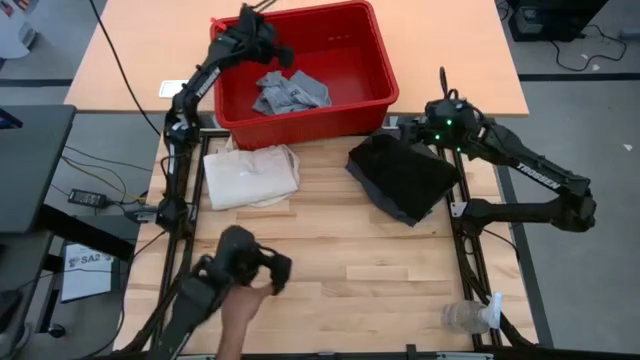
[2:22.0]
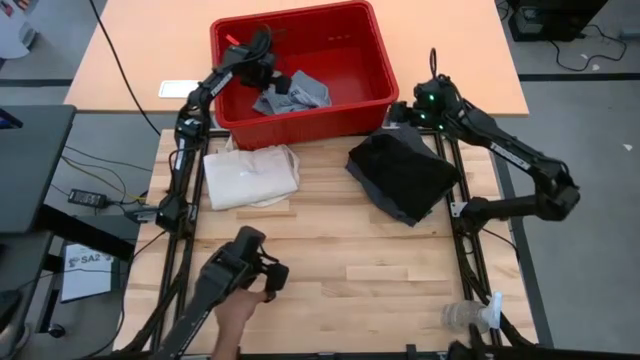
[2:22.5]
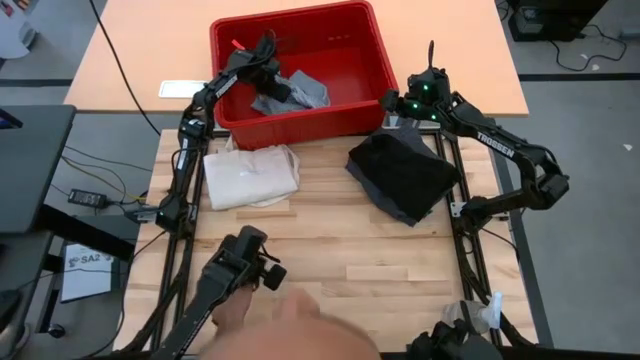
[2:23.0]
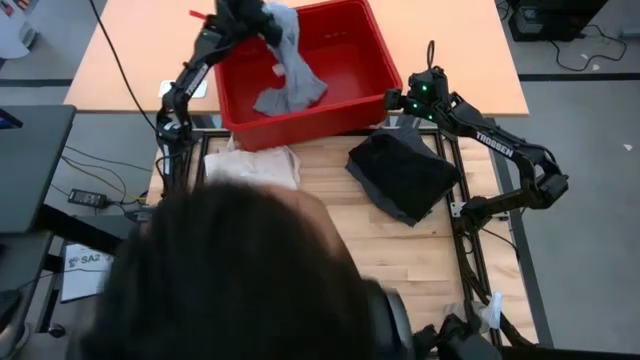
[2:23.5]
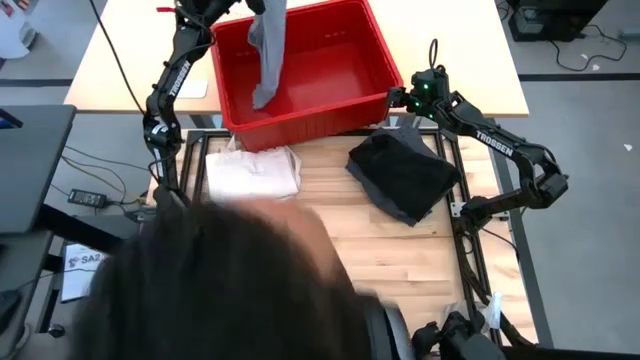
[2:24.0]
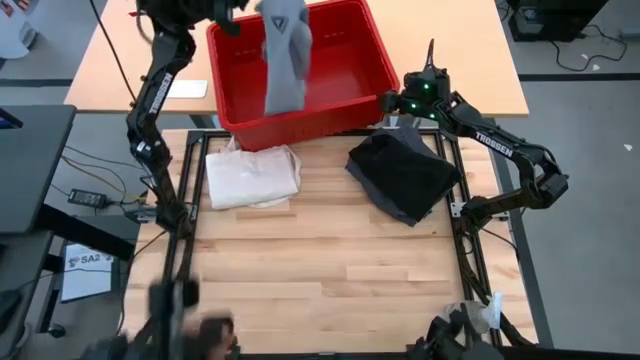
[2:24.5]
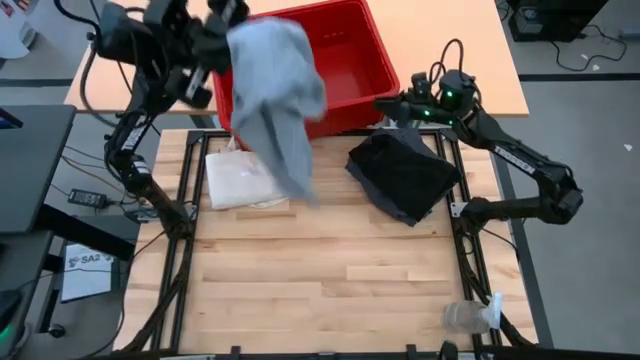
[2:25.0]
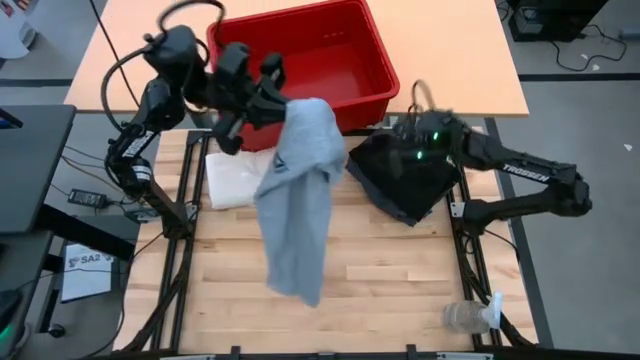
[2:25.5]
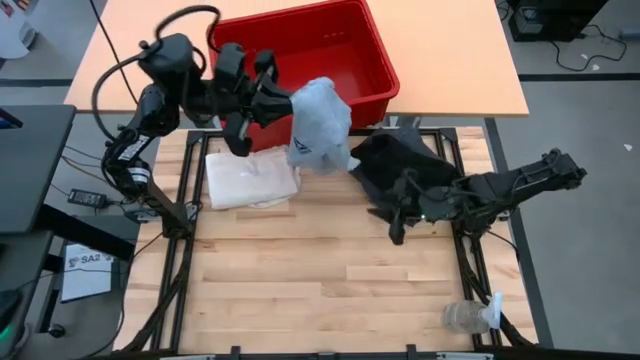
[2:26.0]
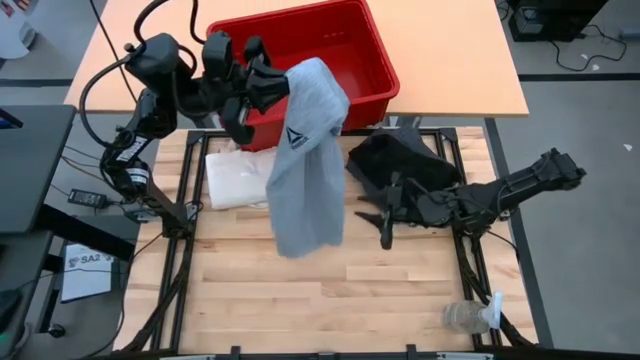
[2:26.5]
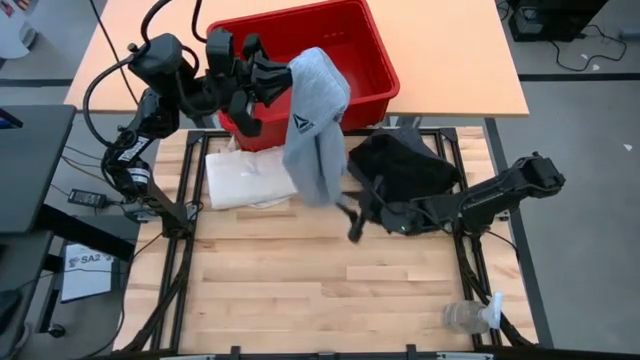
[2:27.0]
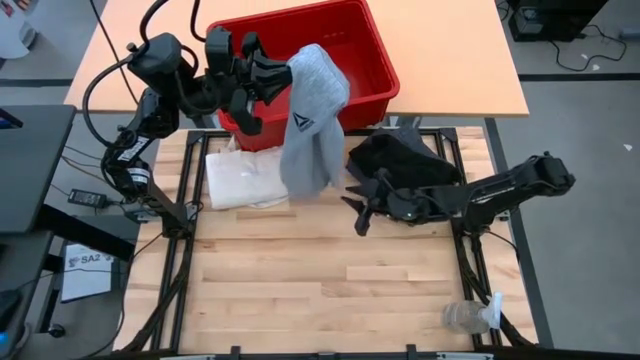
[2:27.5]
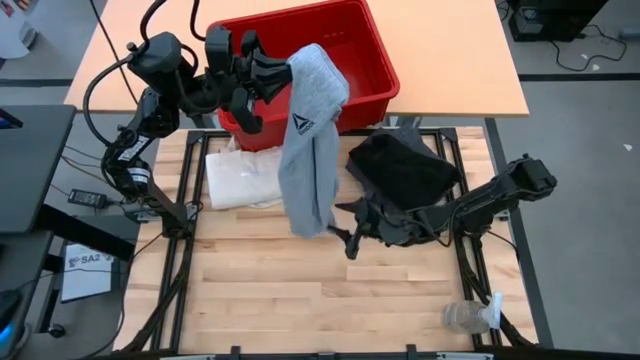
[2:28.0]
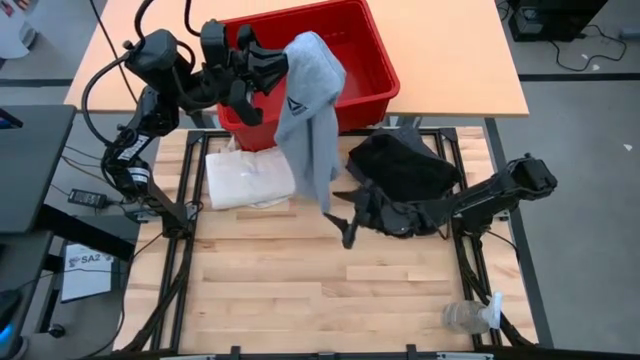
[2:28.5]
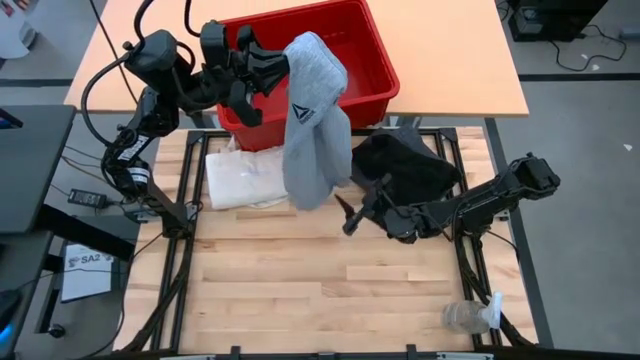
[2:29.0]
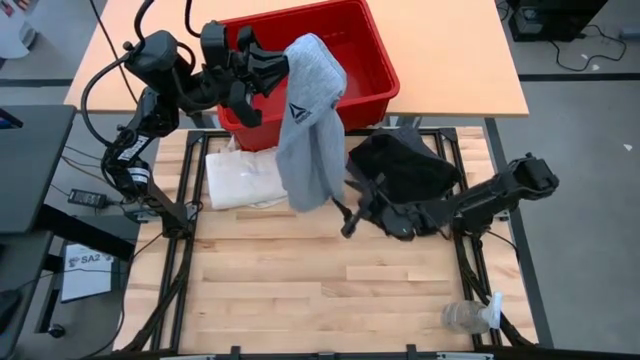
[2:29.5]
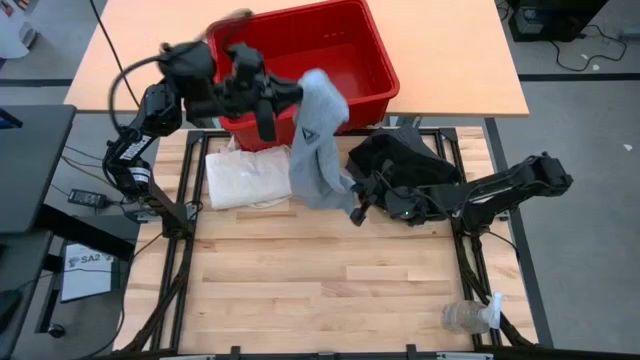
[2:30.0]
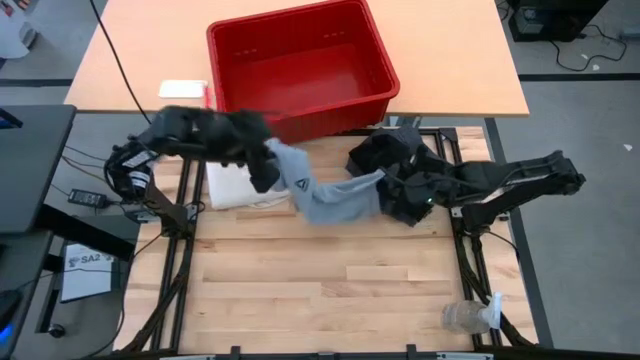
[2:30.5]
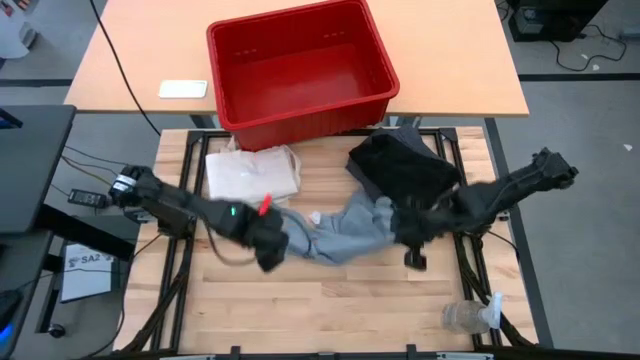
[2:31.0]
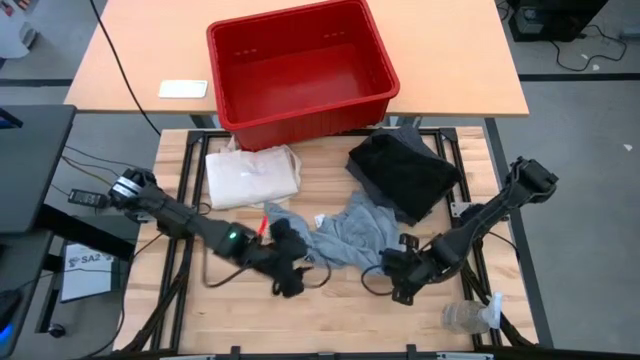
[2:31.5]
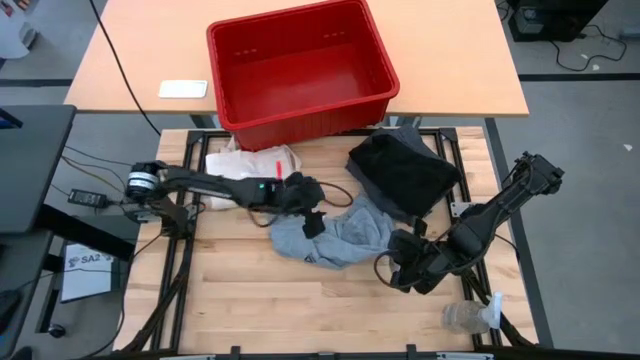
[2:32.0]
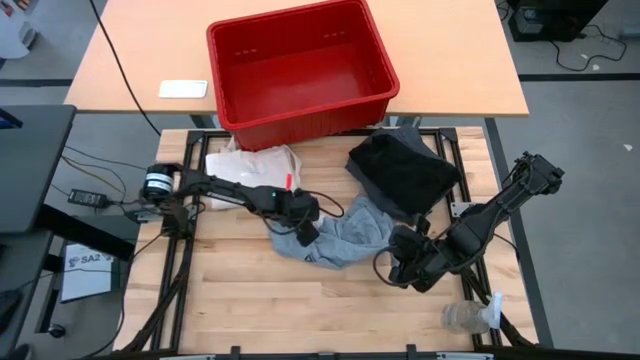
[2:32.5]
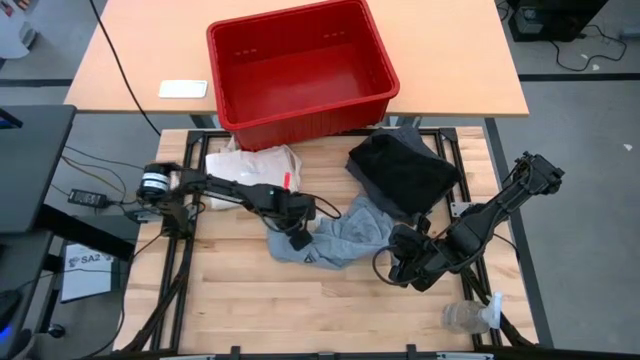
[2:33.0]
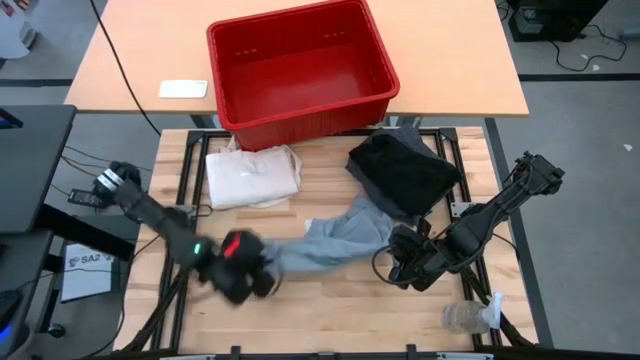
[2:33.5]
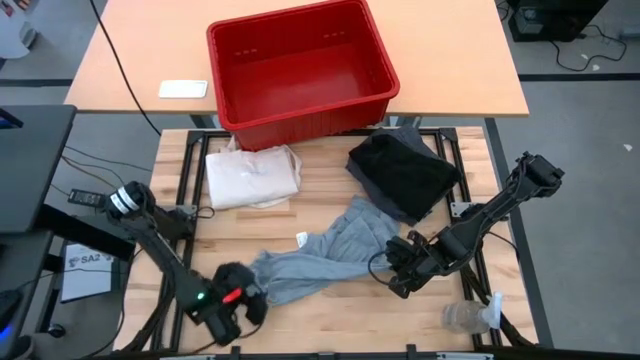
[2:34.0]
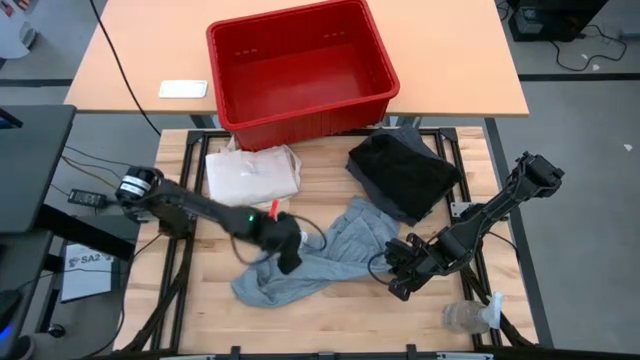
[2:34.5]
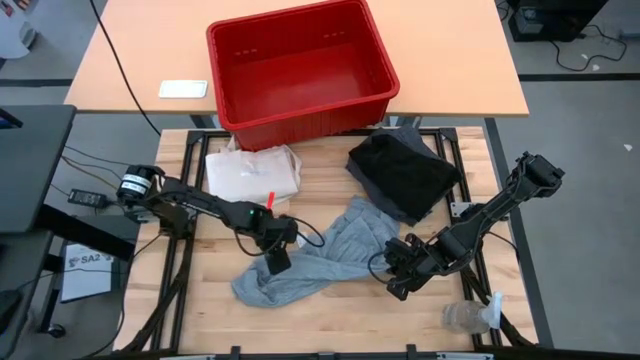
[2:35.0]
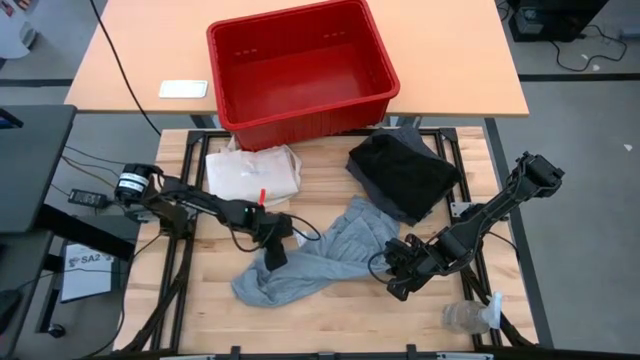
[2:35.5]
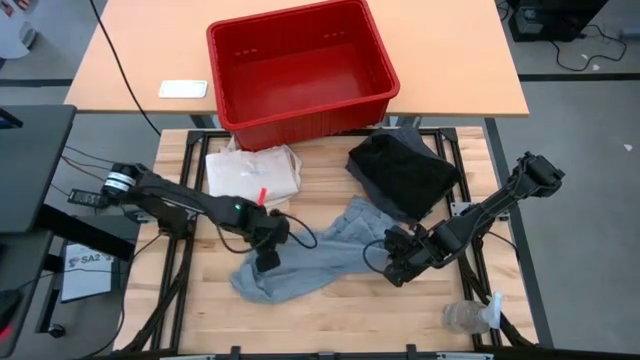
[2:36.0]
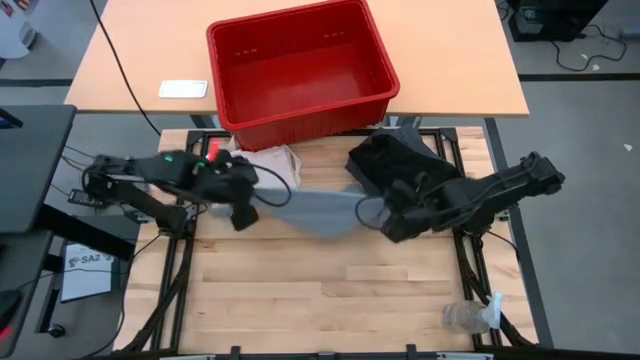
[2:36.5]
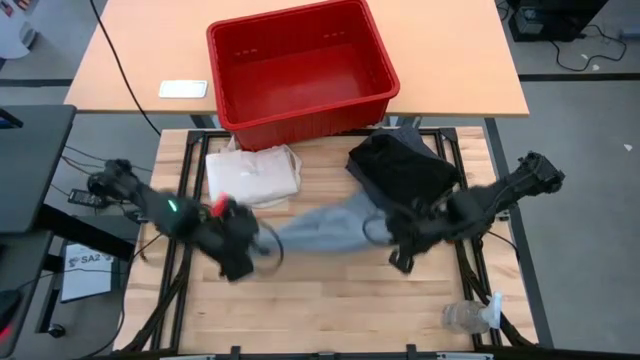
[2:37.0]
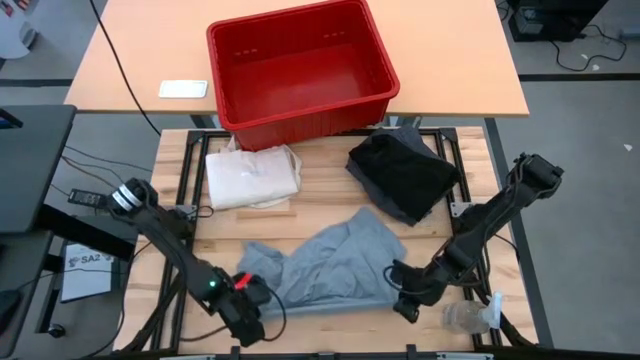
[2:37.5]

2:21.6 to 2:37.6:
Task: Fold laundry
Fold the gray shirt

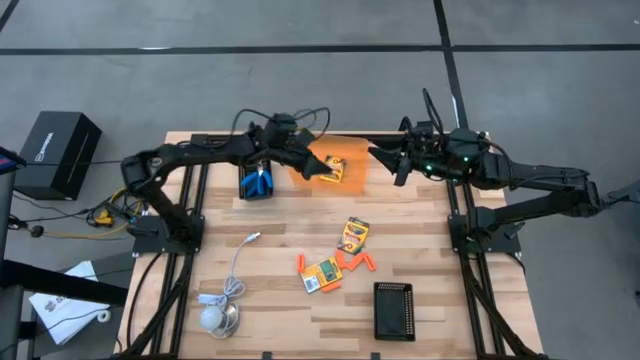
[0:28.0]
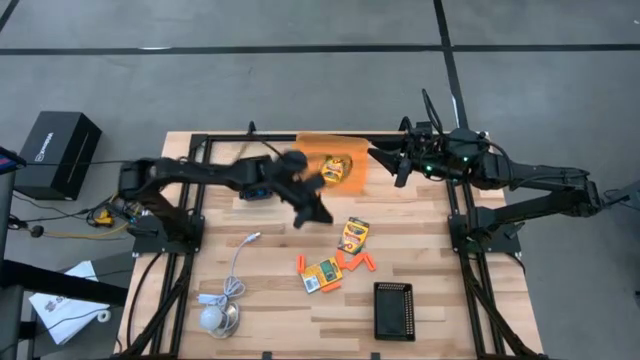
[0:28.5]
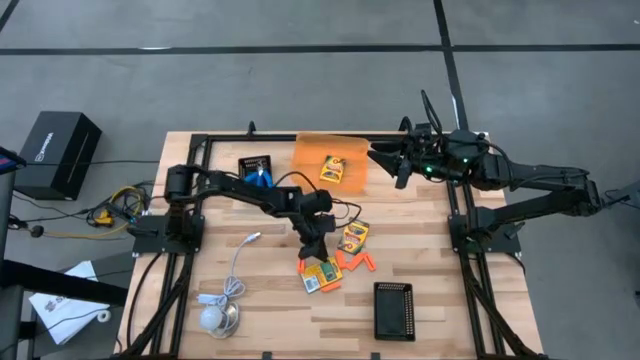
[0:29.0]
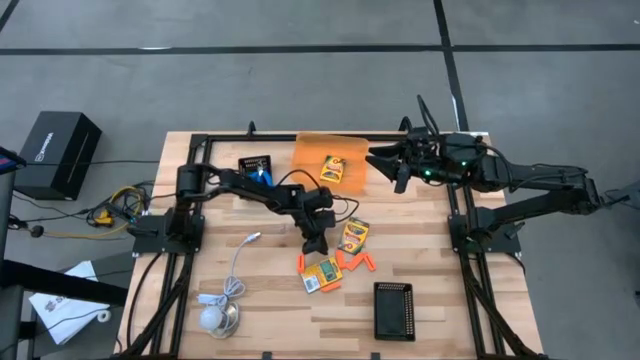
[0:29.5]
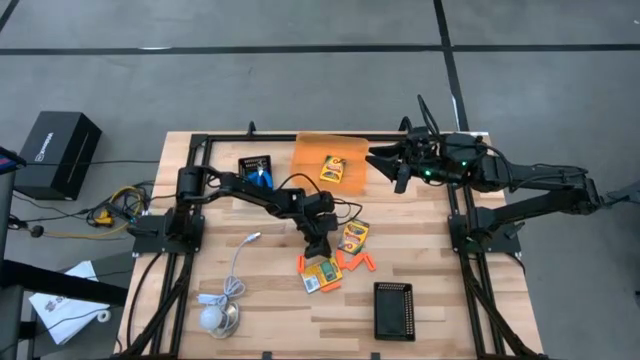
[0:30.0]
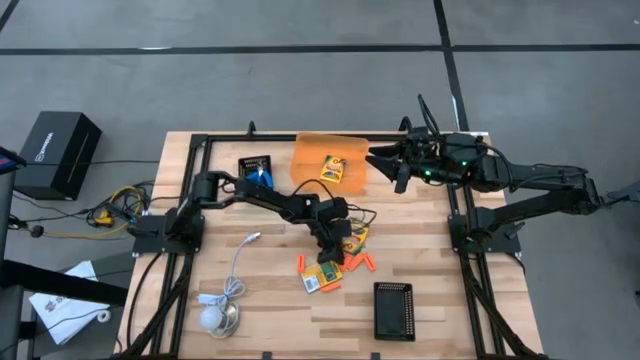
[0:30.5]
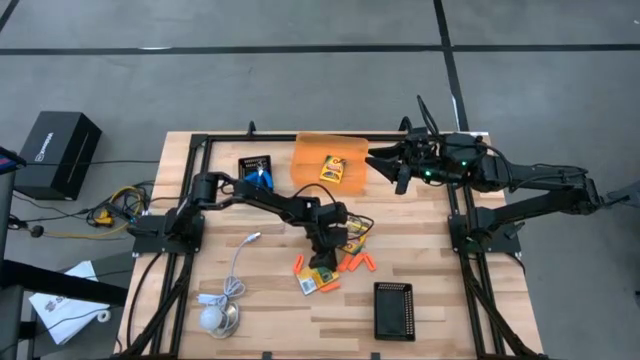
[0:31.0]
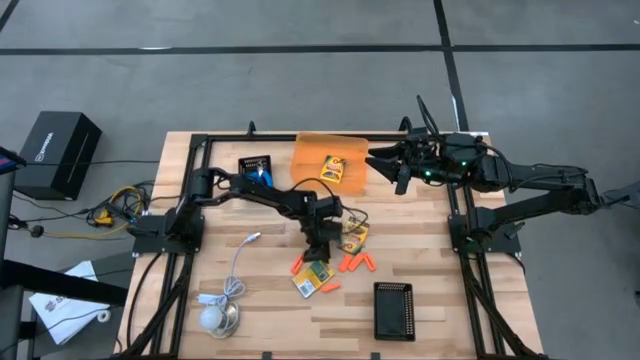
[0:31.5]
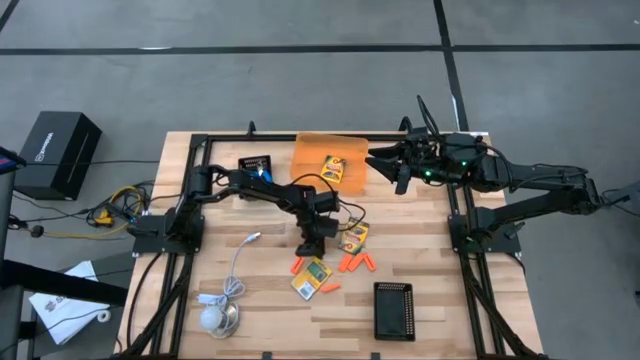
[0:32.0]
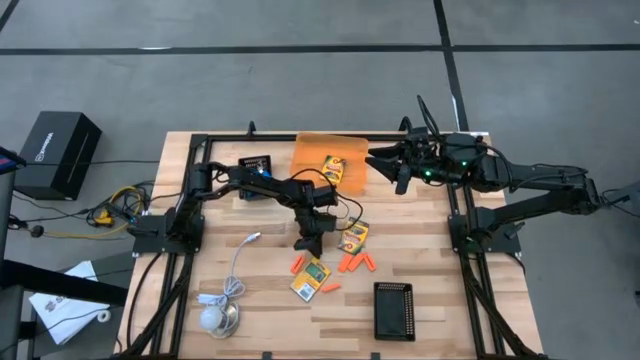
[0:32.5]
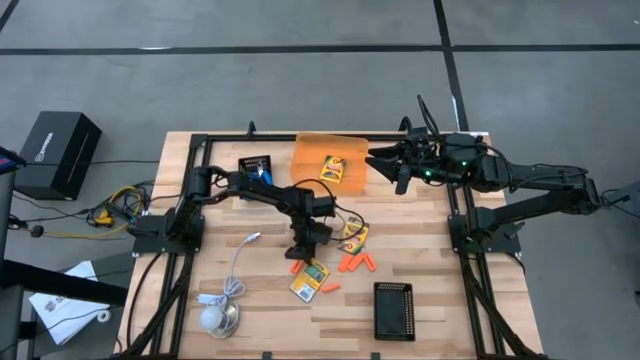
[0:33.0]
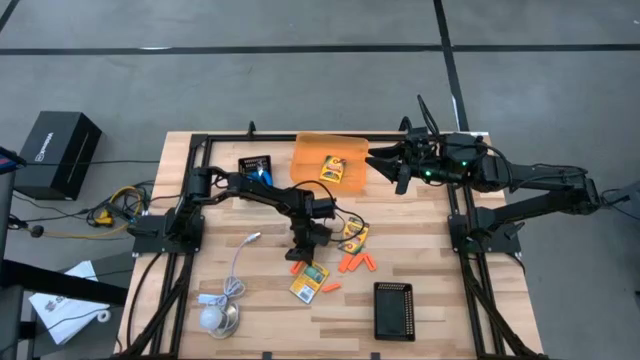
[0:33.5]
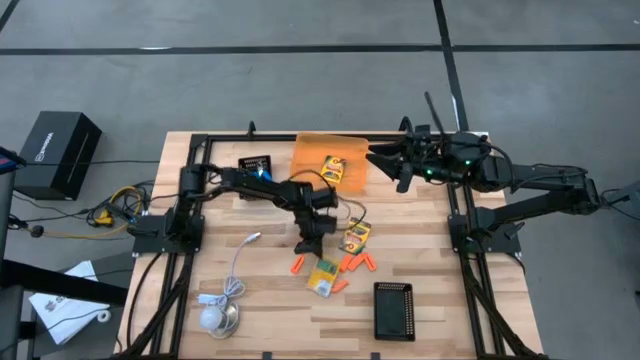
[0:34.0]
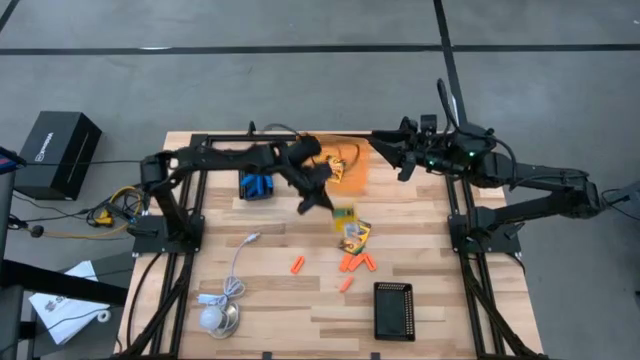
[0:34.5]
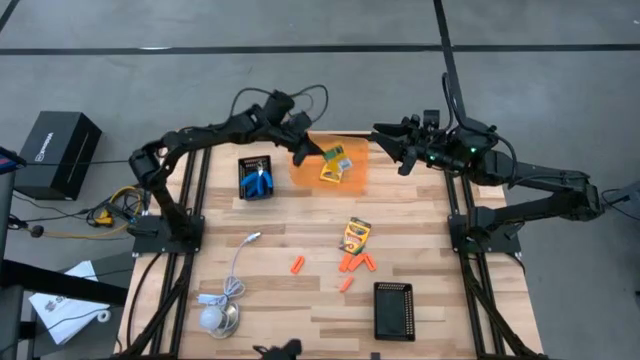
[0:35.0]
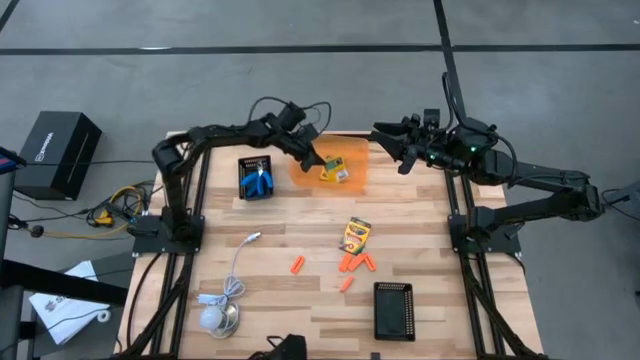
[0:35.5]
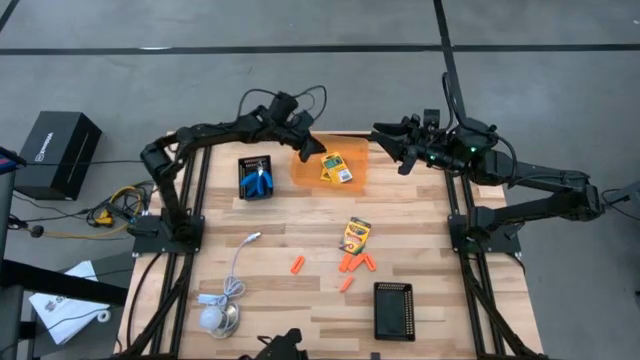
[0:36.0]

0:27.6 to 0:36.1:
Task: Pick & Place School Supplies
Put the crayon box into the orange bin
